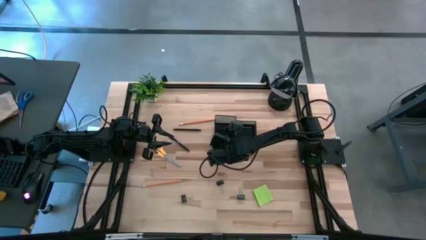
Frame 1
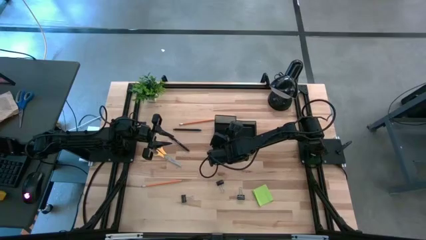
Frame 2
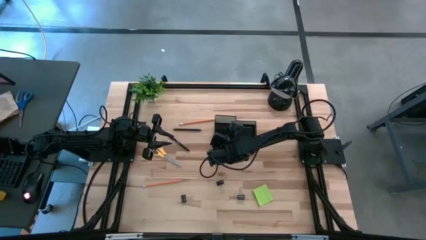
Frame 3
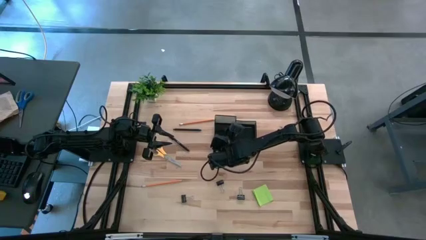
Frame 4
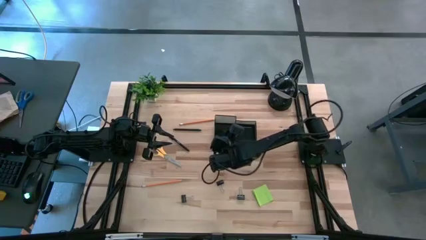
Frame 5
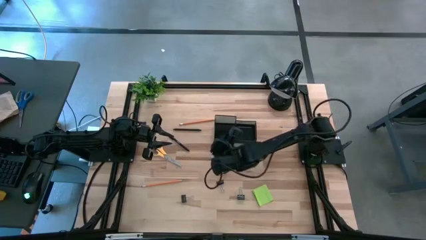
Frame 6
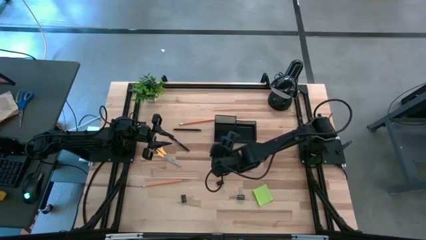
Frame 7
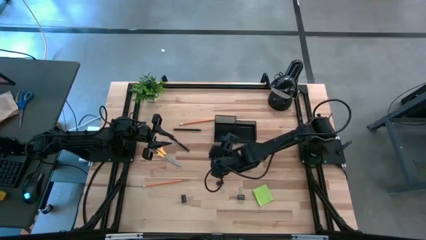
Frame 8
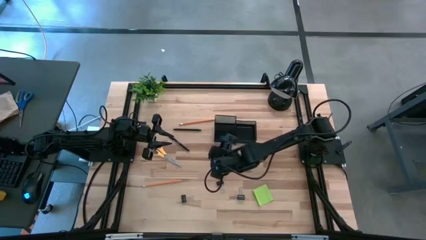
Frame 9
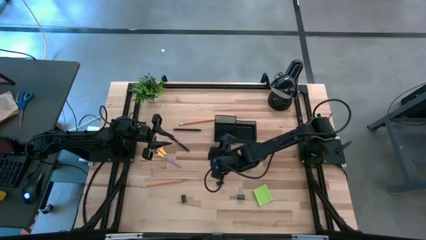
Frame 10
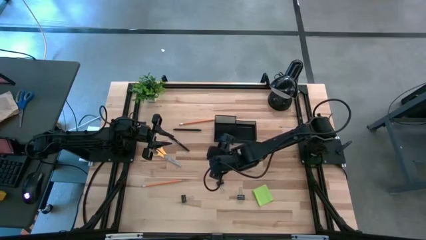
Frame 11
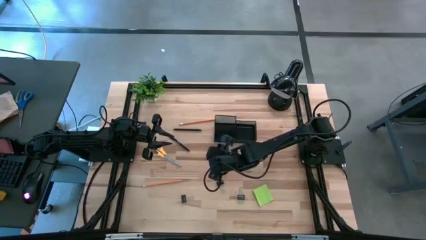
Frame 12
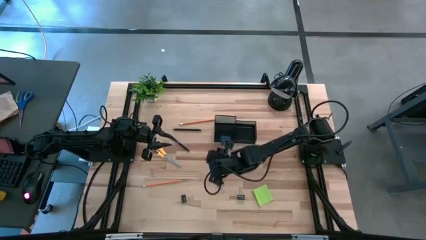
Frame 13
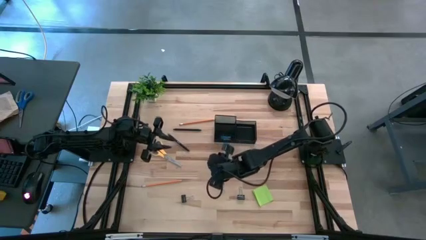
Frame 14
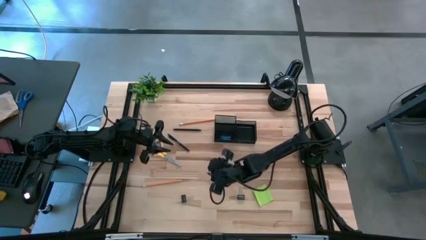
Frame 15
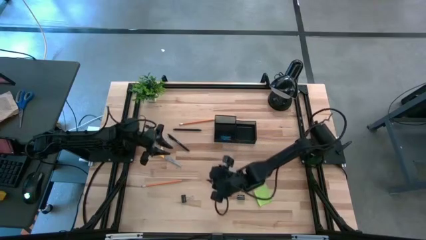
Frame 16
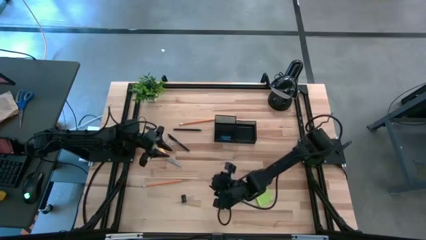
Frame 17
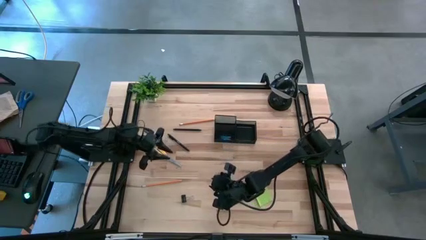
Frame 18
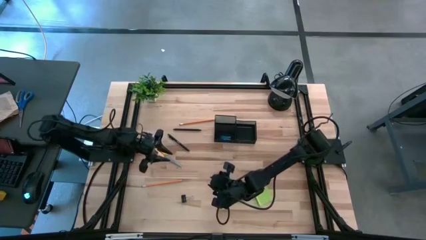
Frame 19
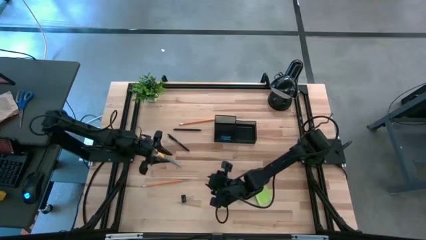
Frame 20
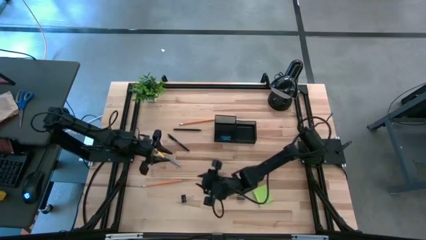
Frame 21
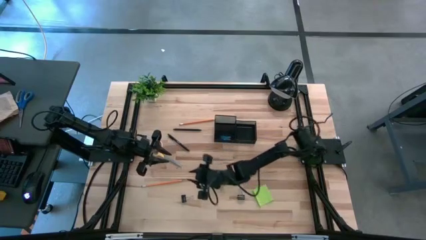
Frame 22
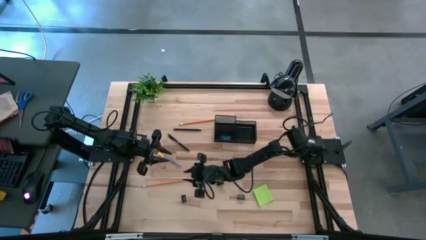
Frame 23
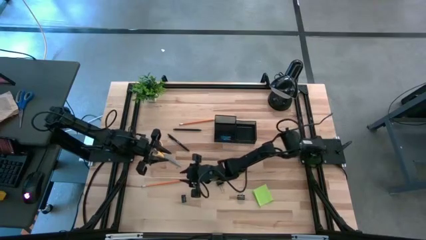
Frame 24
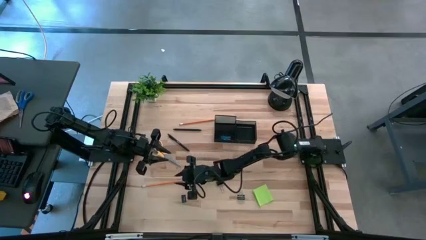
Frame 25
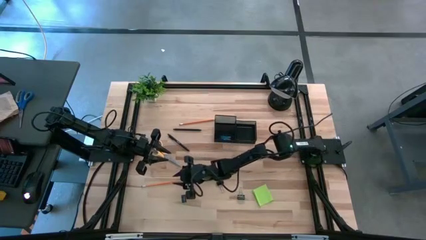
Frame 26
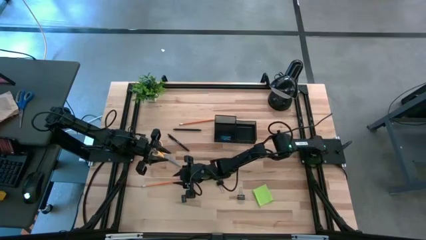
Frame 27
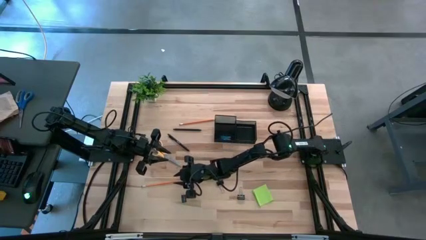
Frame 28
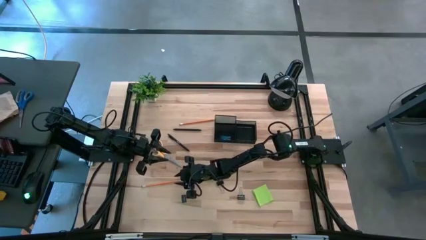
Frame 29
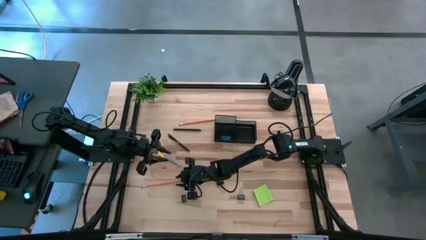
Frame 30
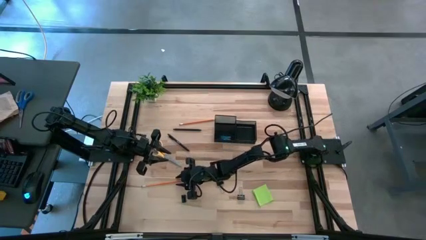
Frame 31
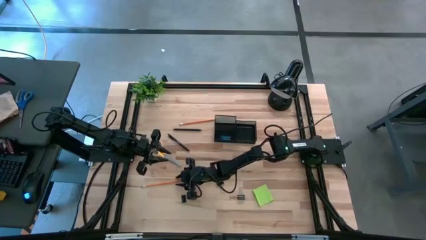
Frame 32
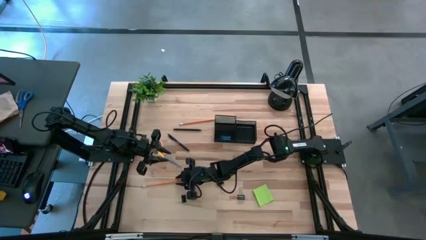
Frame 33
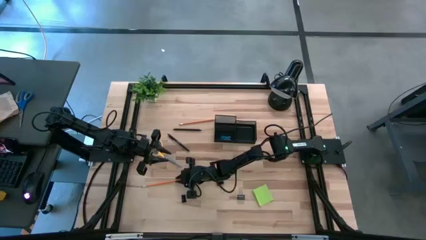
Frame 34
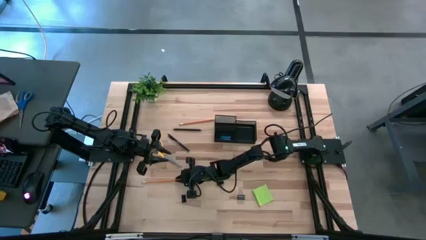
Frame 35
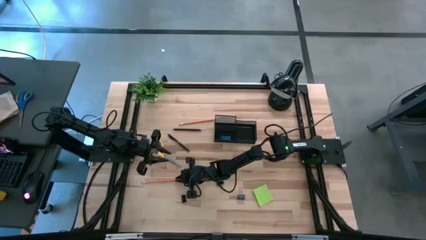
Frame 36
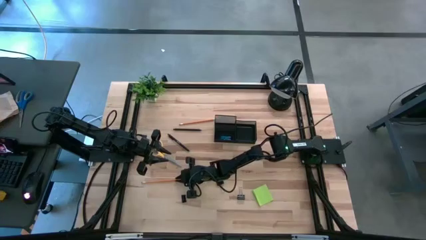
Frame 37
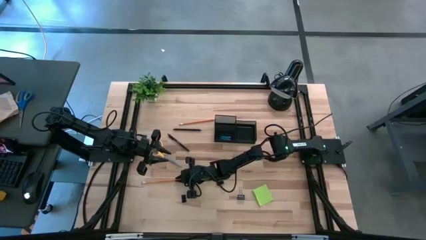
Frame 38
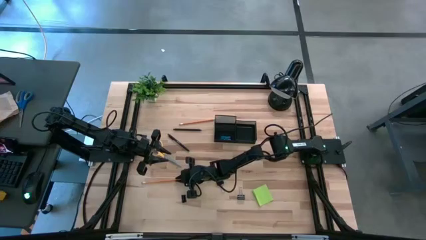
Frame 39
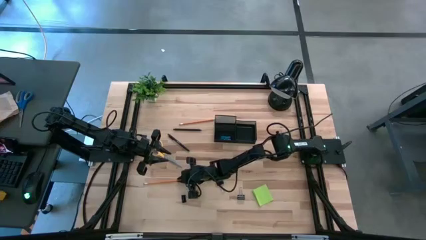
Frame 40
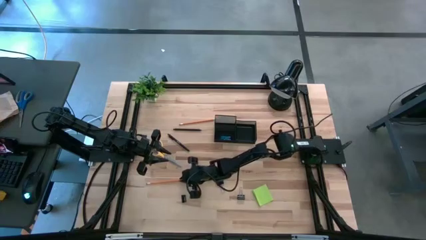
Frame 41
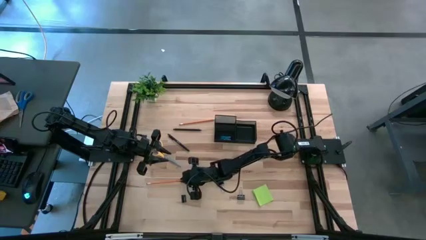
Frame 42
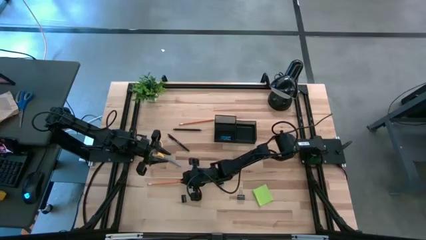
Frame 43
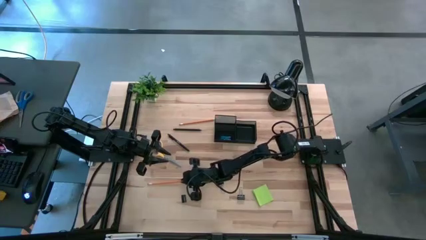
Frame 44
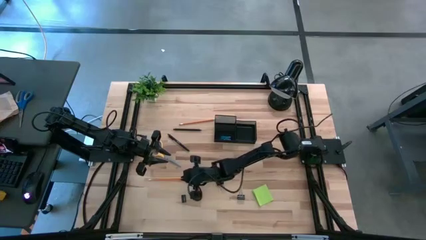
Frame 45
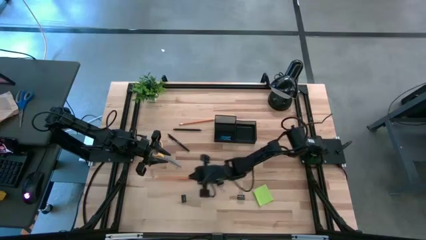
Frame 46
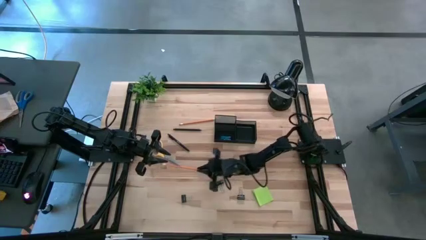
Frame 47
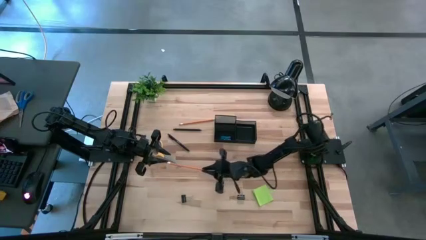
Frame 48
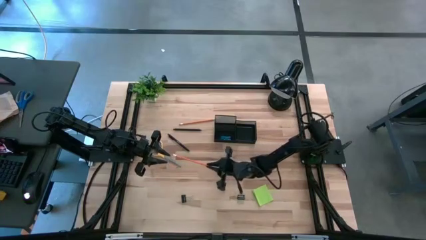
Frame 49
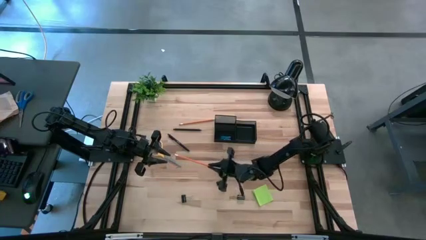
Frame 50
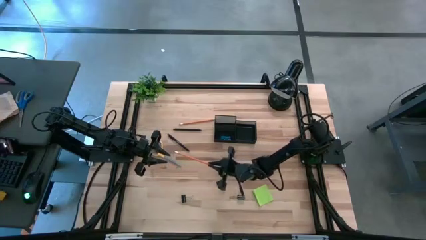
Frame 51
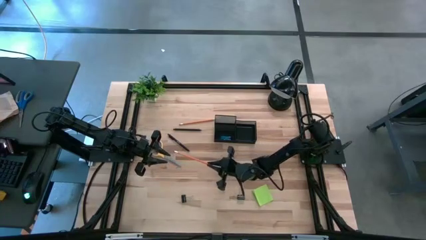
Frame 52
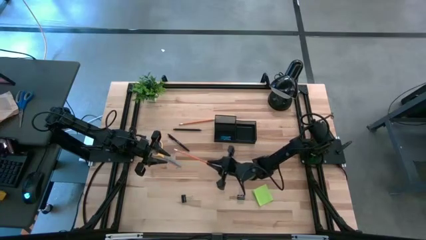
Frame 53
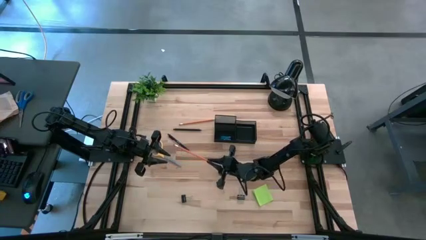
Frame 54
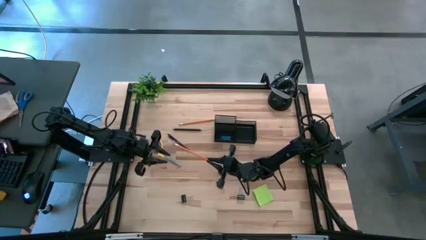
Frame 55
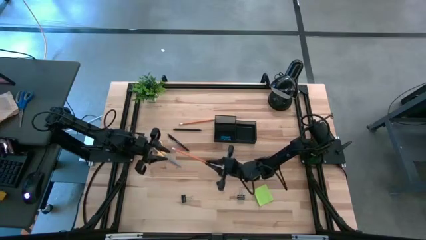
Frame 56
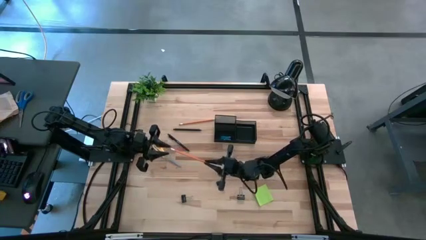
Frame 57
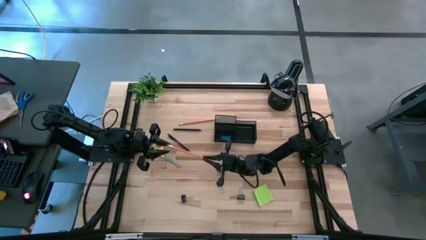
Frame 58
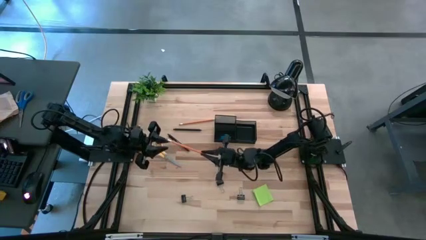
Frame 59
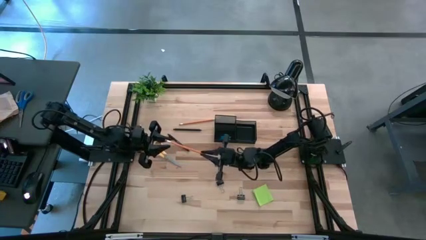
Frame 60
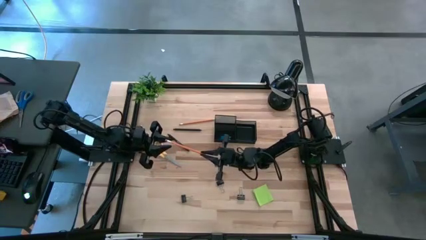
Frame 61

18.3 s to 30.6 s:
Task: Pick and place office supplies into organizer
Put the orange pencil into the desk organizer

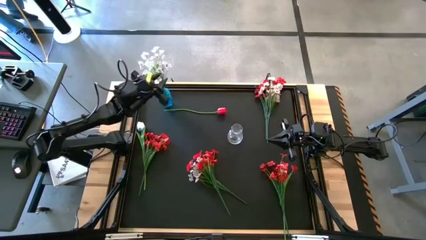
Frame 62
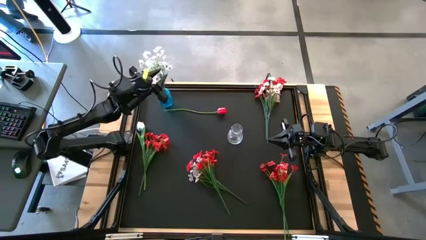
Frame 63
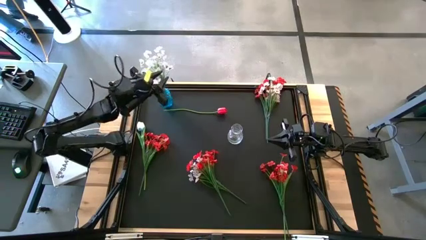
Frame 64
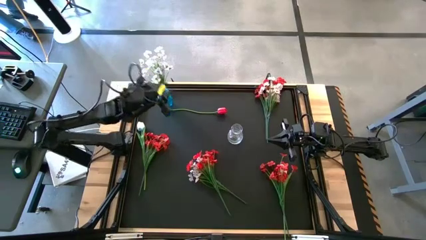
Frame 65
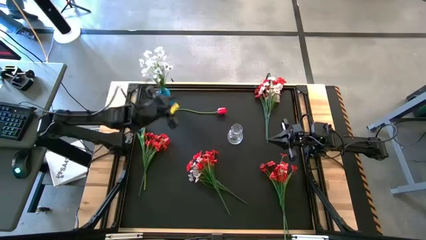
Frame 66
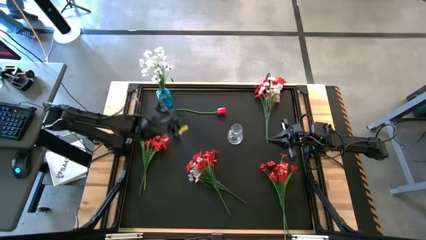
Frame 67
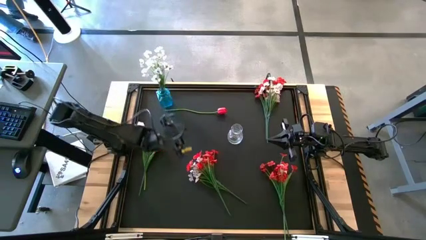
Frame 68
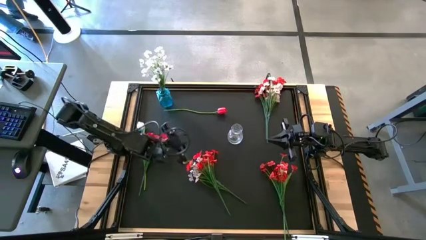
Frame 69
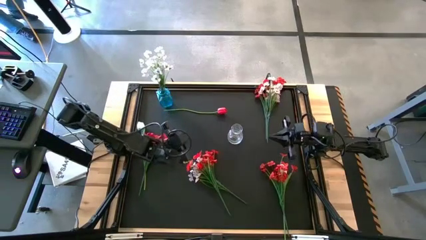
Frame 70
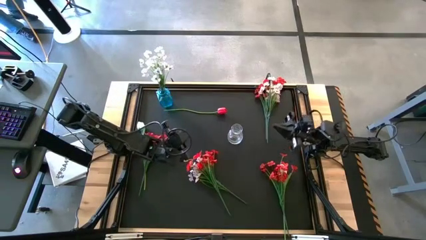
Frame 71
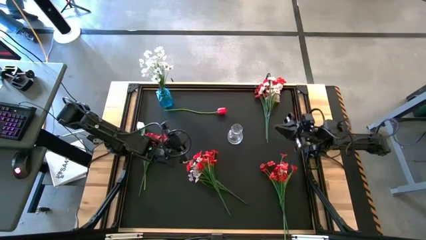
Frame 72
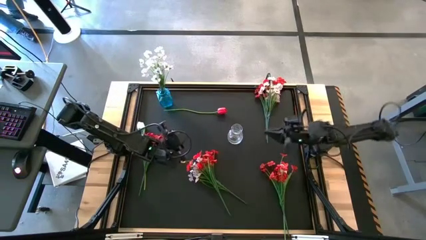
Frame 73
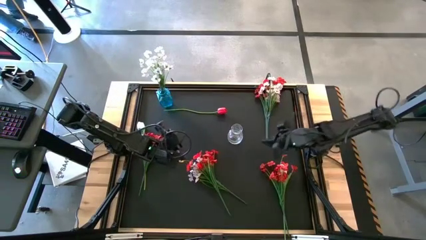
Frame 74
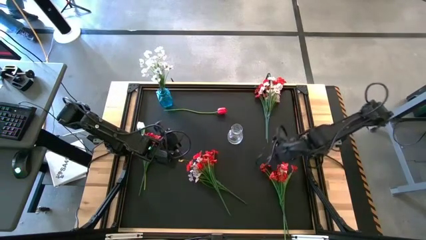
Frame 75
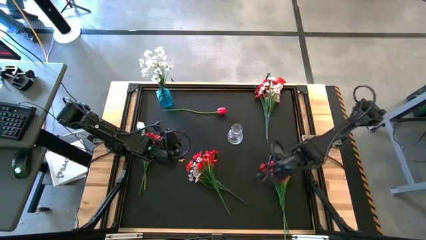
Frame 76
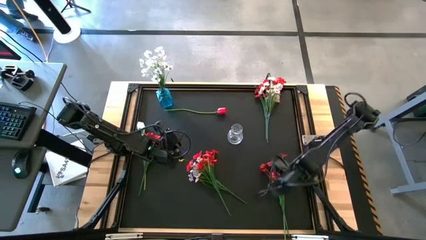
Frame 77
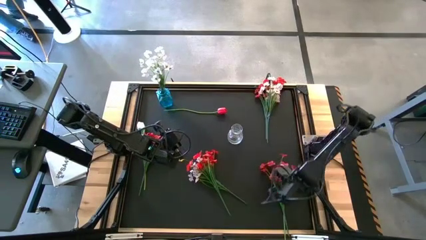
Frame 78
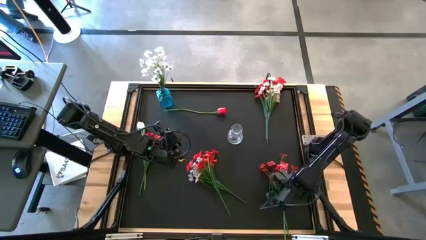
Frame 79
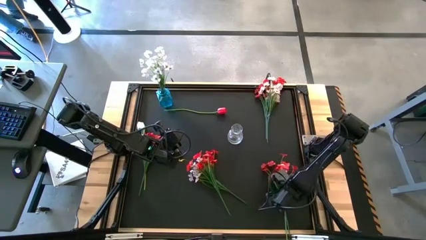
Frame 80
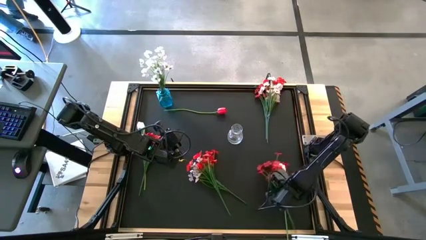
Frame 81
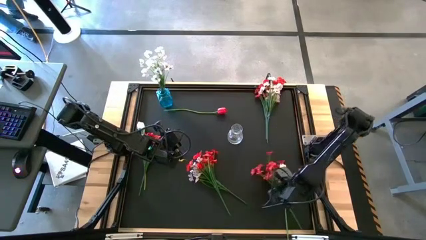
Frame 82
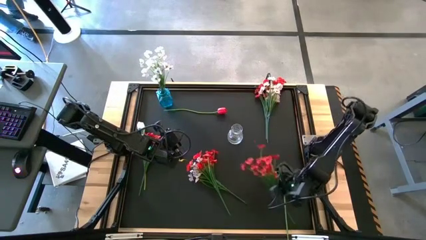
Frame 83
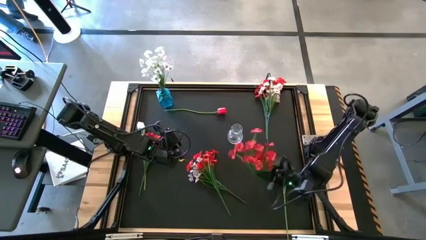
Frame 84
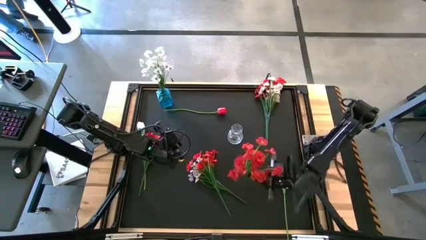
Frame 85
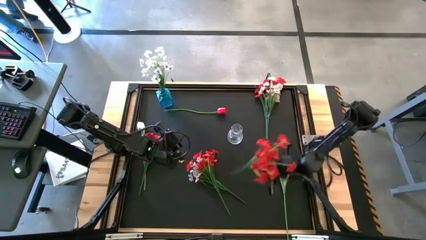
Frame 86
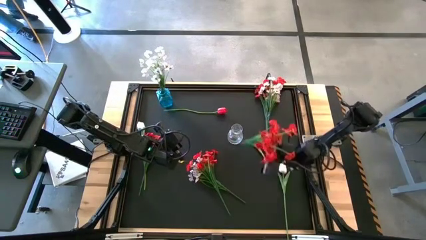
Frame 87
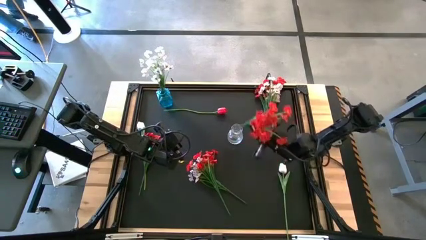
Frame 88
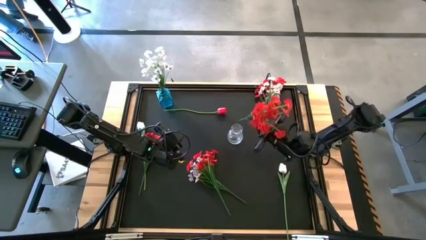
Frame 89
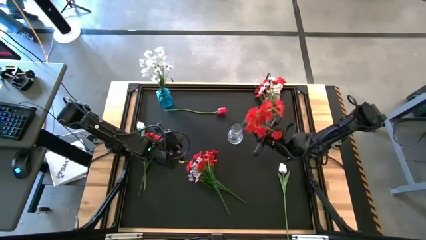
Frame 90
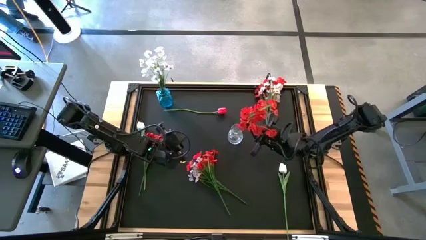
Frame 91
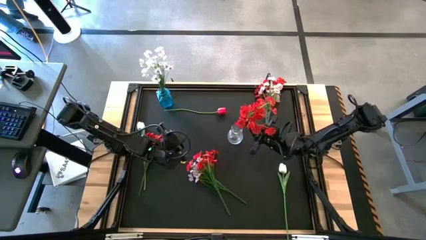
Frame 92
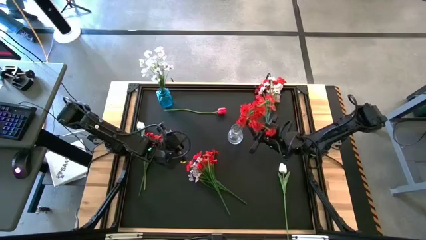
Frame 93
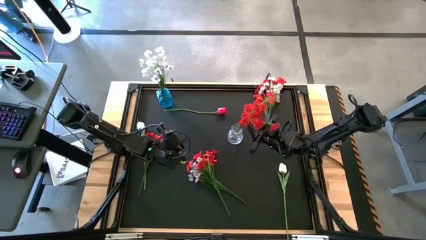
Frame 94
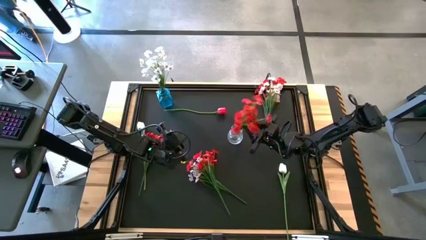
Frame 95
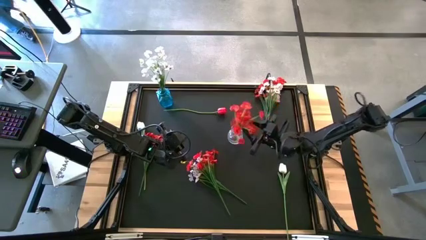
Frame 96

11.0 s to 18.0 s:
Task: Sort flowers into vase by color
Put the bottom right red flowers into the transparent vase
